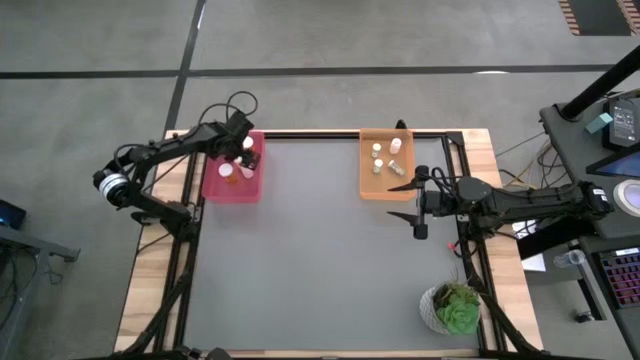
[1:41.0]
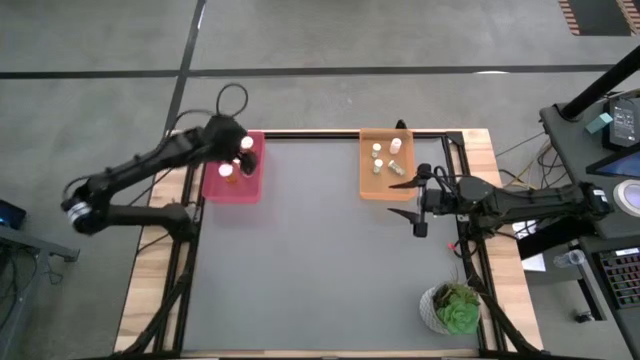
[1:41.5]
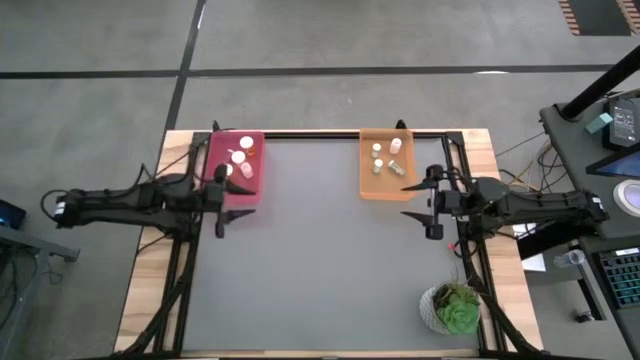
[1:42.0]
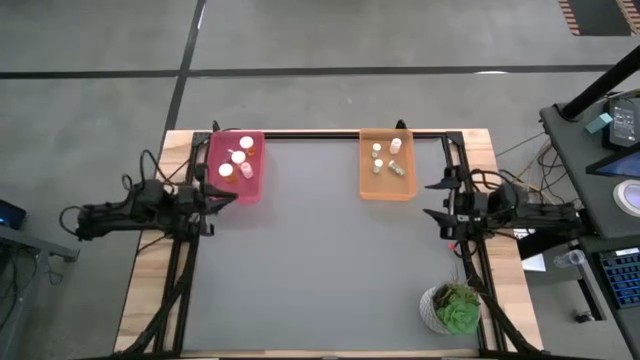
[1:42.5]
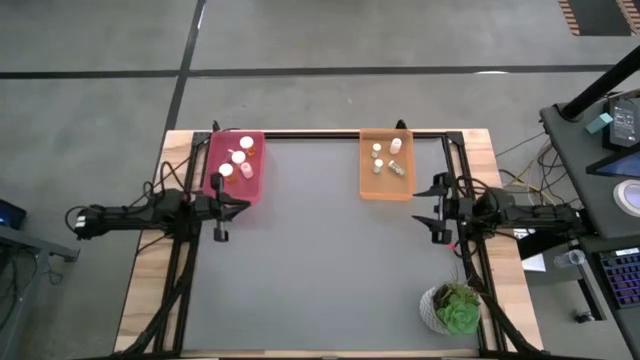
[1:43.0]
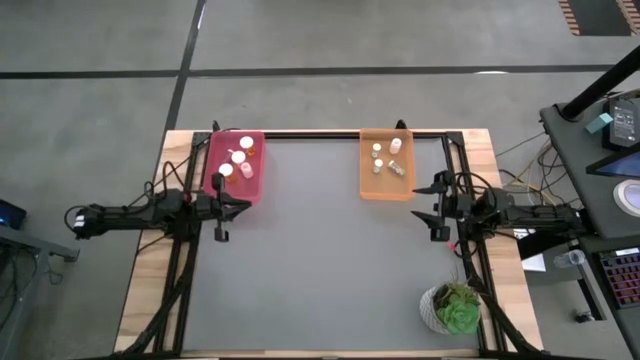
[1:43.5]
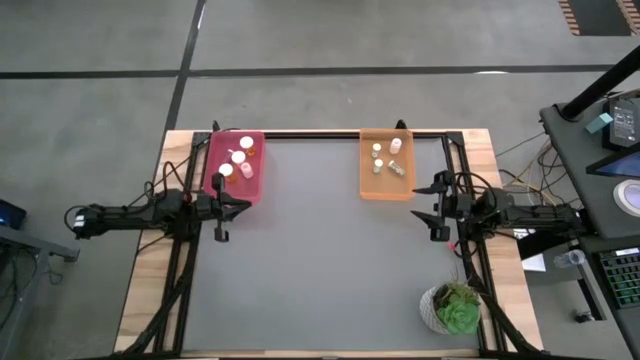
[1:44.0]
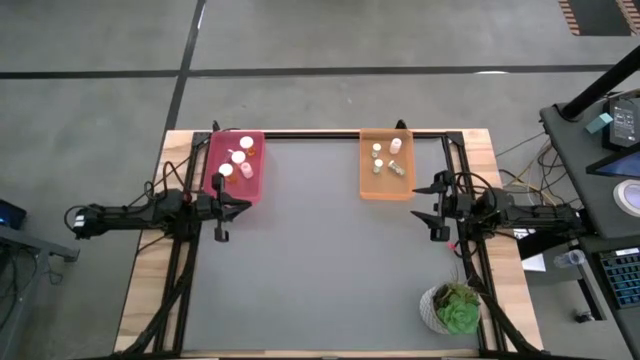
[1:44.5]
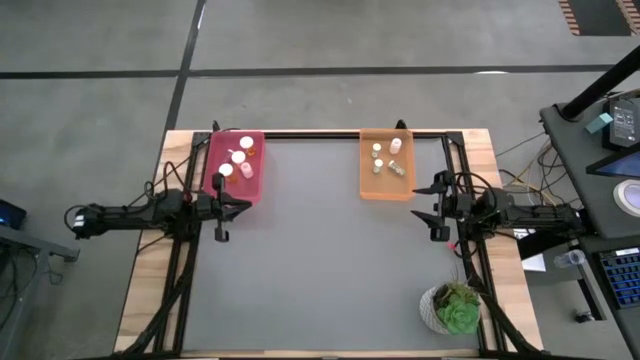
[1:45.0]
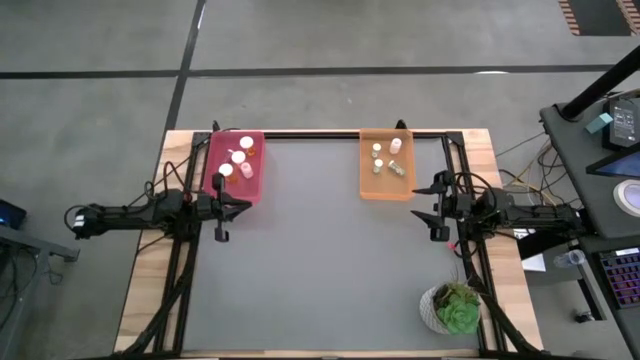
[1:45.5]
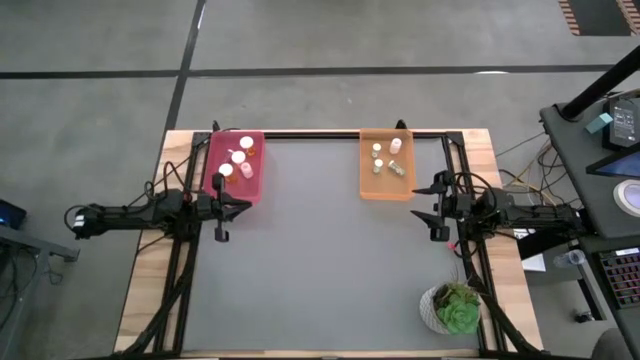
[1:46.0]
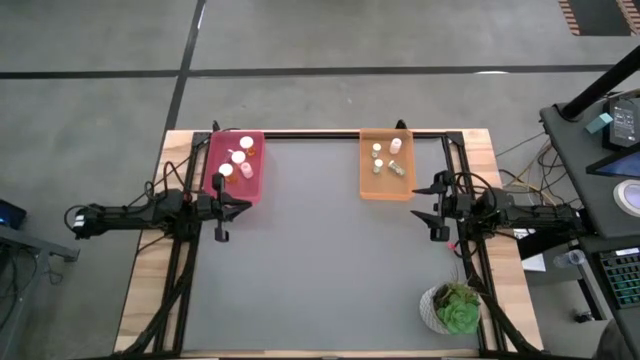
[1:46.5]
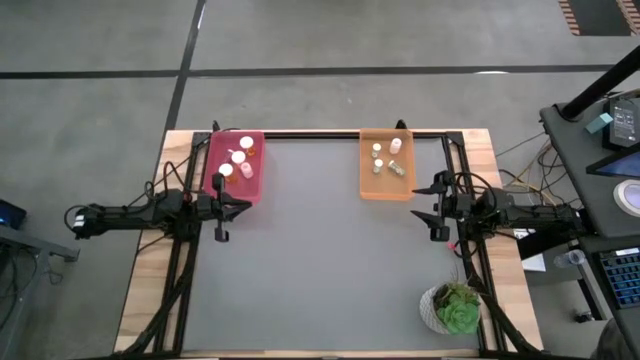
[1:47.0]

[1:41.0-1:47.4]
Task: Pick and place medicine bottles into bin by pill shape (circle, oval)
Return to Home position

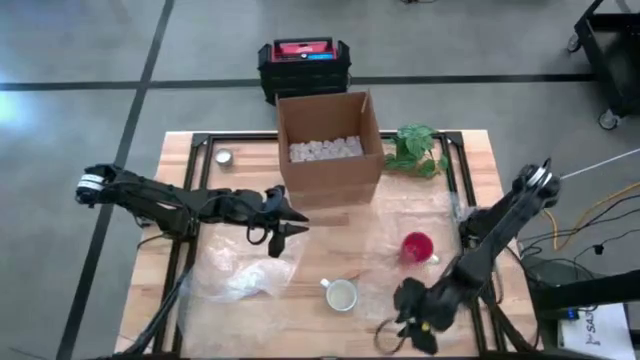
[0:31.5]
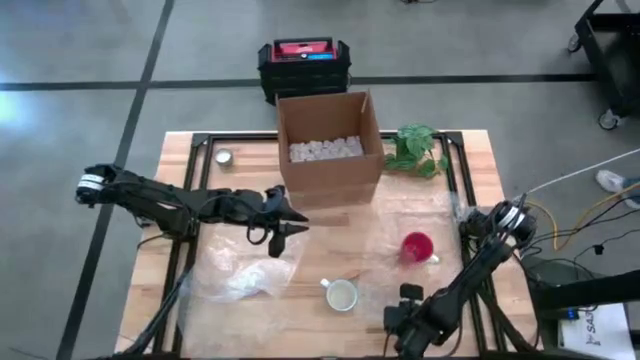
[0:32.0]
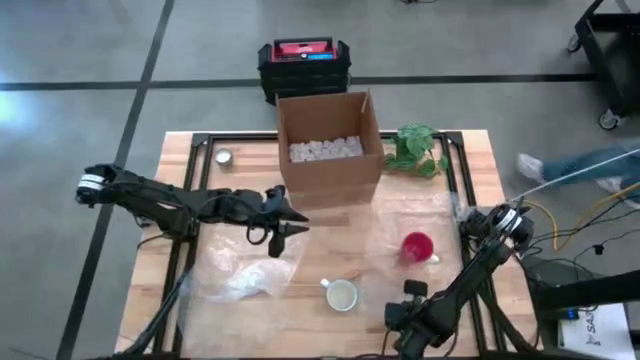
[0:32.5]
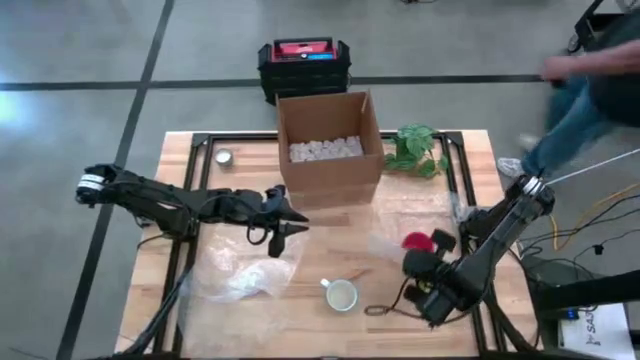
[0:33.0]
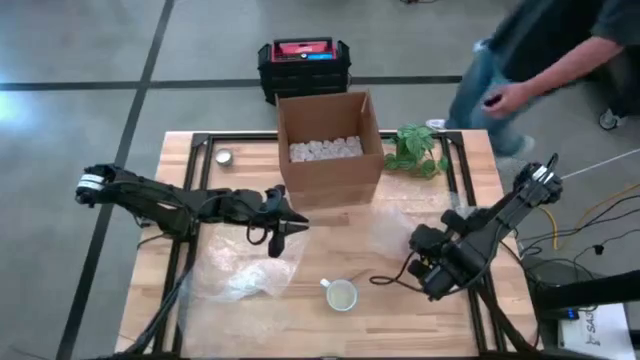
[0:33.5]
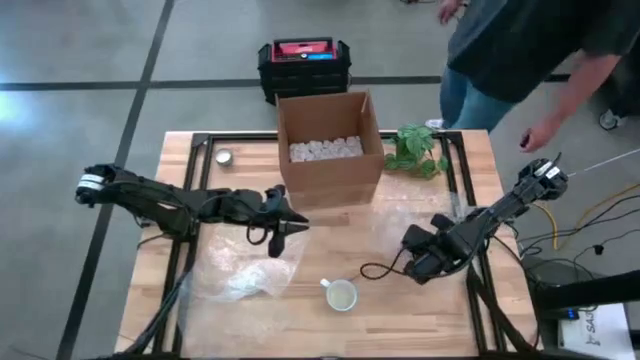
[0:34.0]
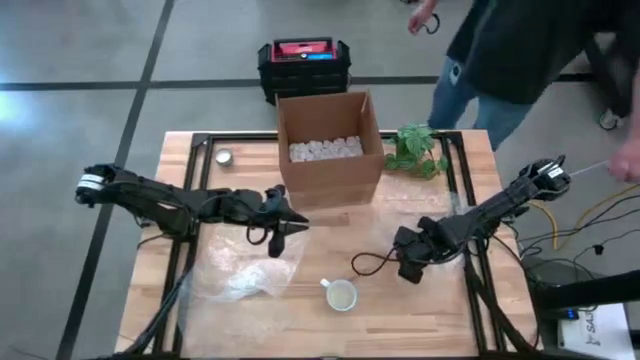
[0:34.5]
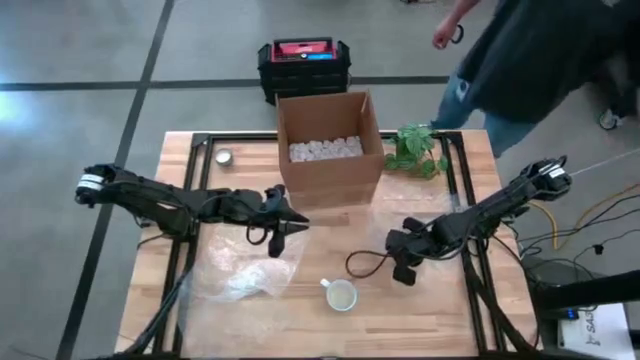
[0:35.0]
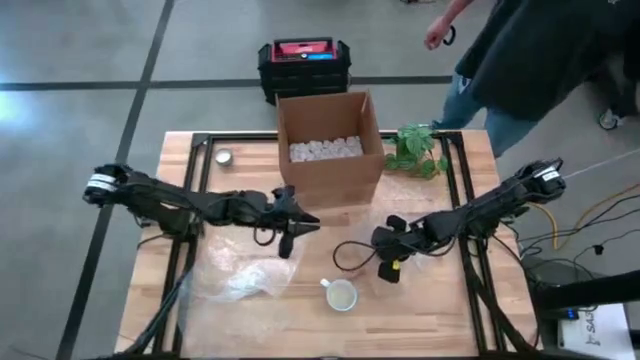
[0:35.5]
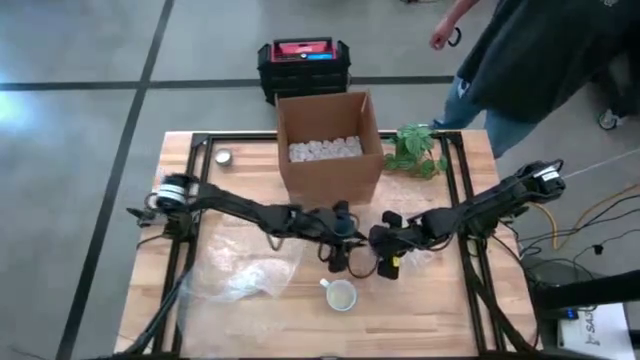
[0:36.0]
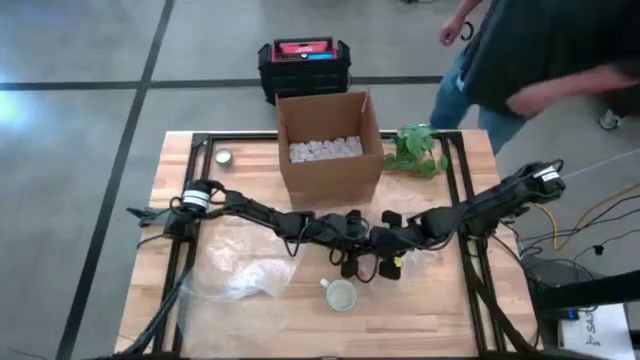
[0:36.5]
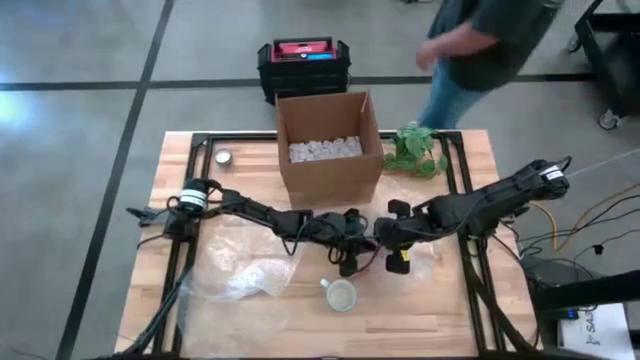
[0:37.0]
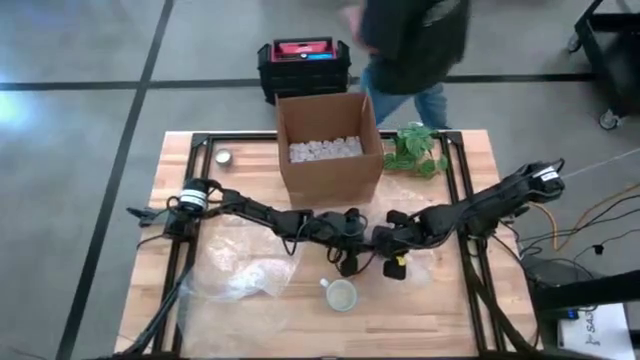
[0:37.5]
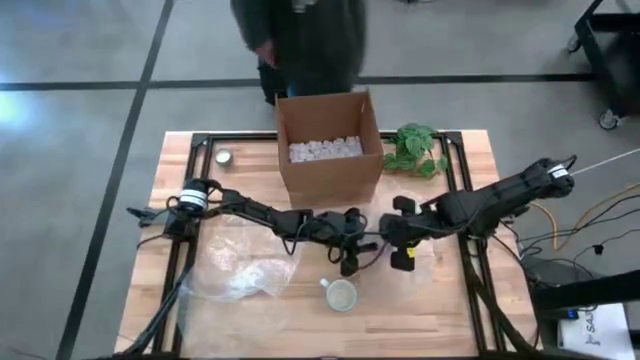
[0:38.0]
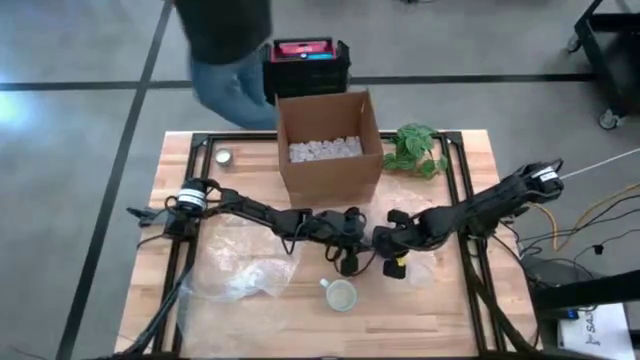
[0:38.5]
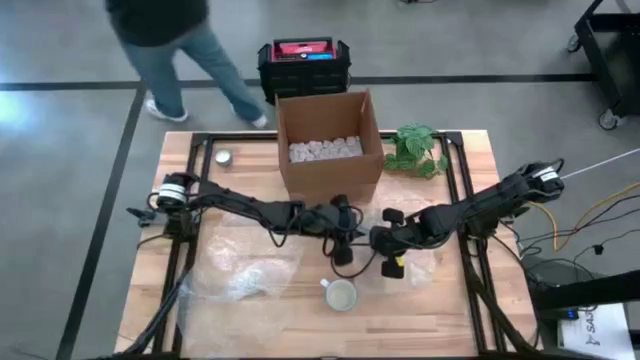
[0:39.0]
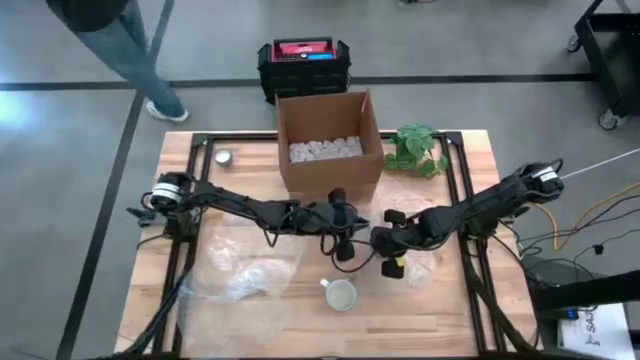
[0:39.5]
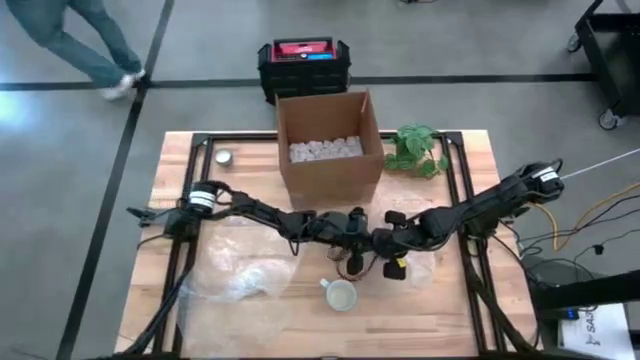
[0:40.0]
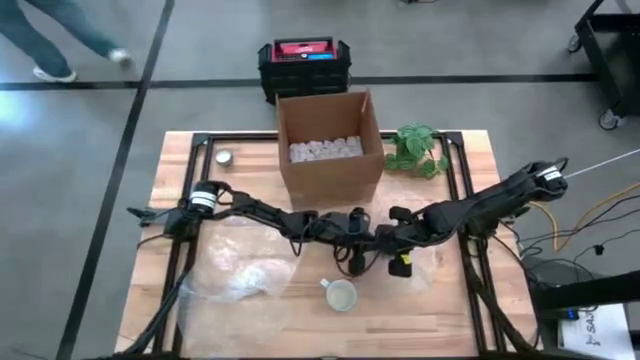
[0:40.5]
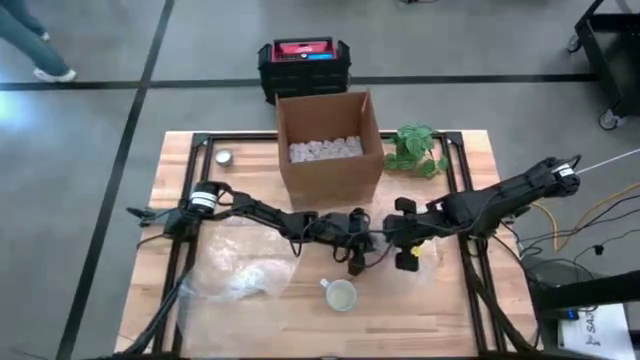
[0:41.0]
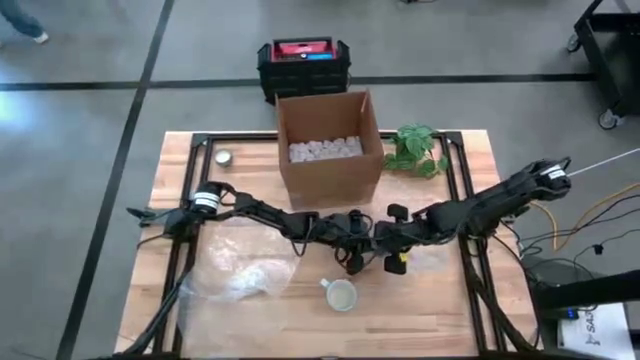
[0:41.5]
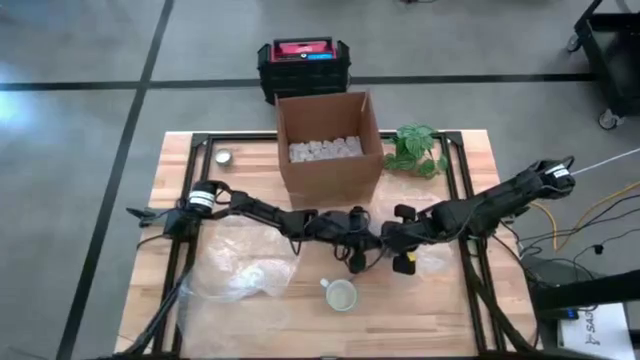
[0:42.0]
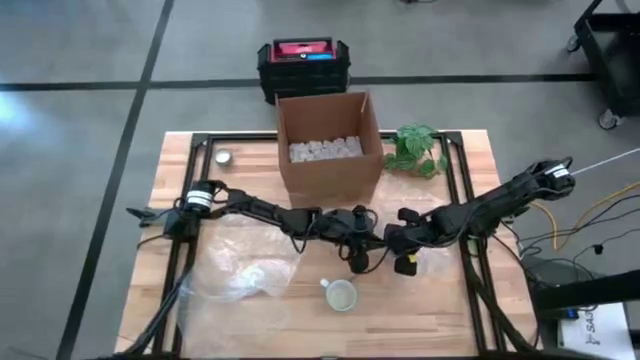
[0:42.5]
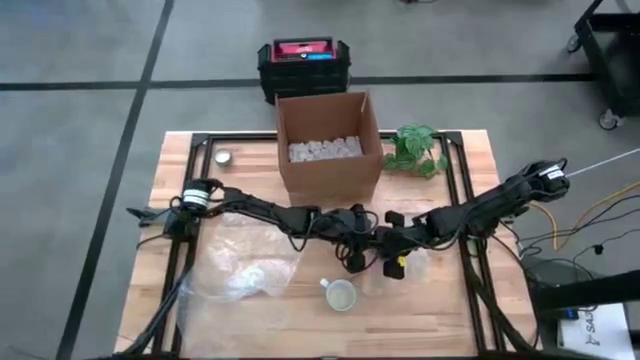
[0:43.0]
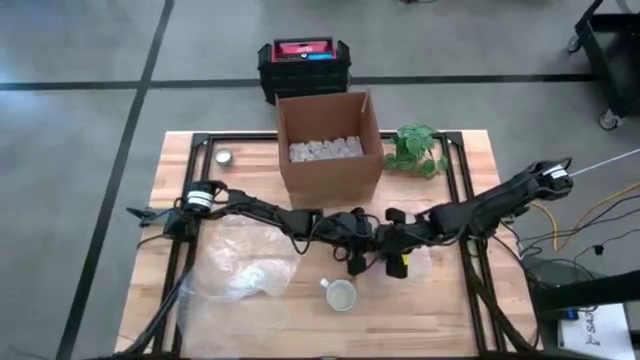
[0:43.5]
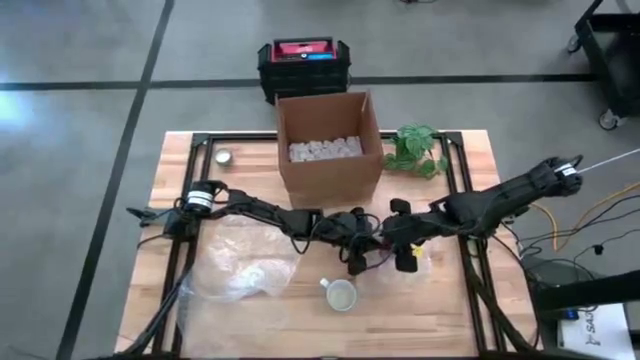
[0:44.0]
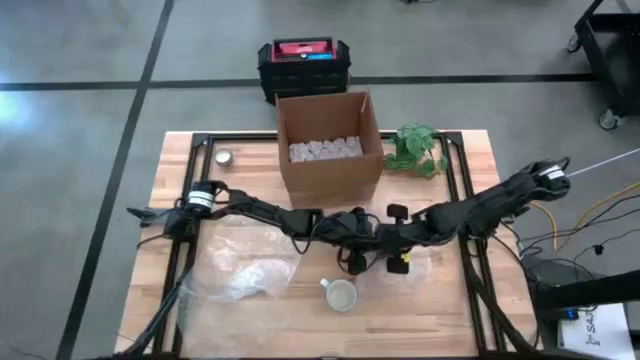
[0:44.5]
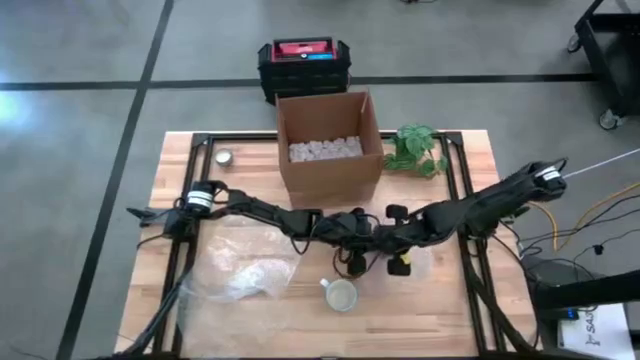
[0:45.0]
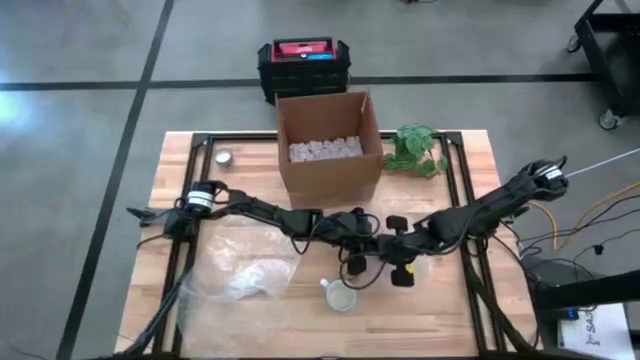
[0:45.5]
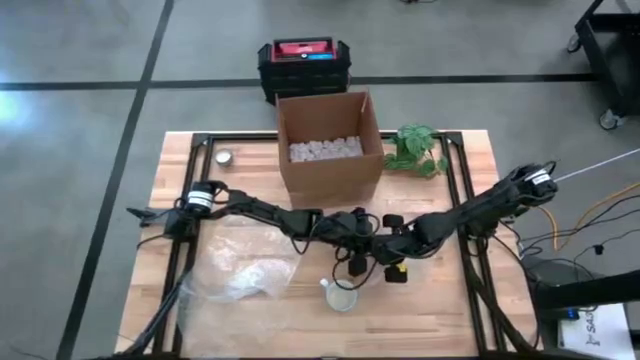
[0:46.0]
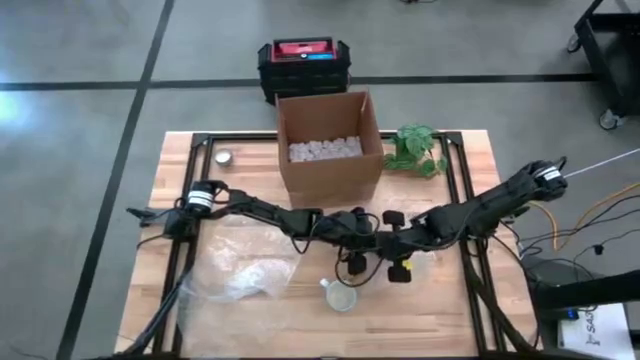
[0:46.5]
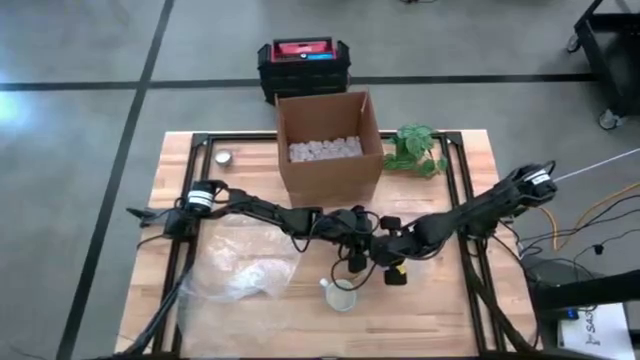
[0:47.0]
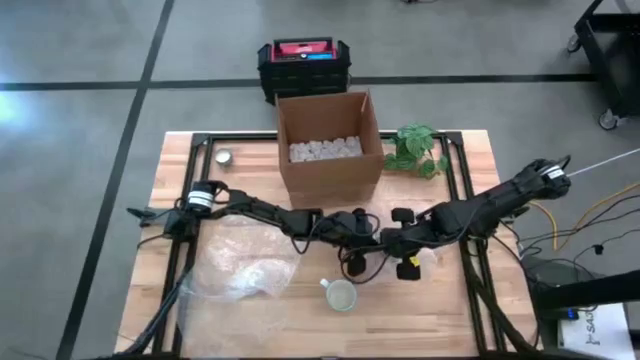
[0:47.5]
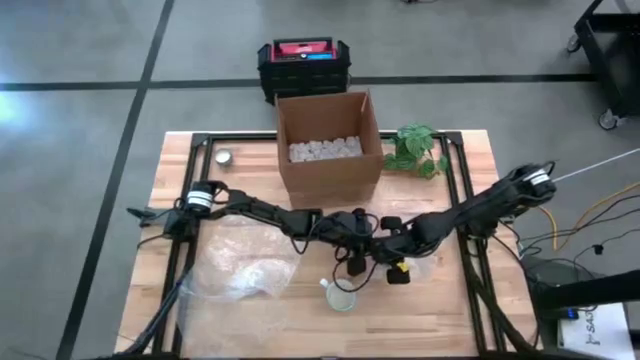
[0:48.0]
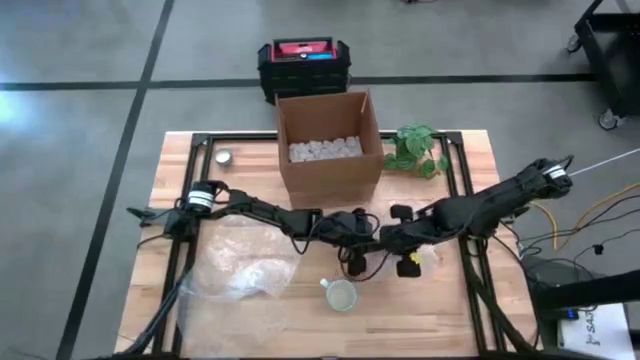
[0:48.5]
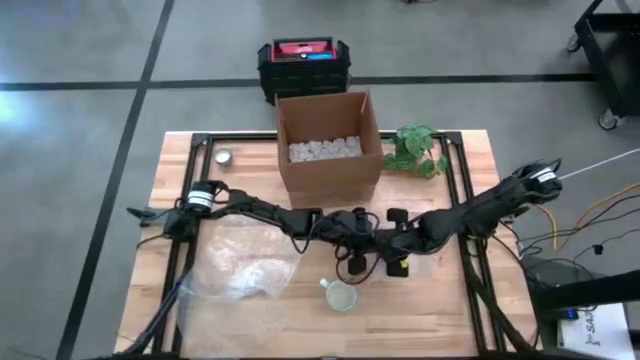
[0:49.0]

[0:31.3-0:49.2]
Task: wrap mug
Wrap the orange mug in bubble wrap
